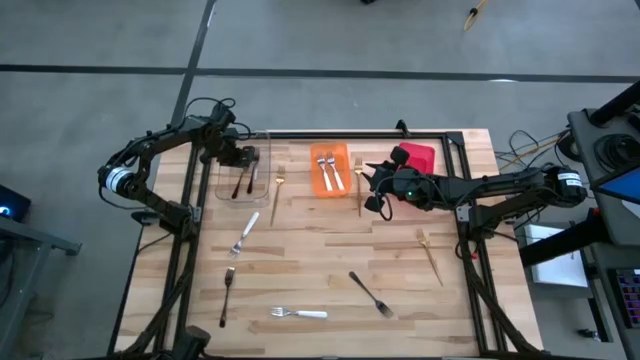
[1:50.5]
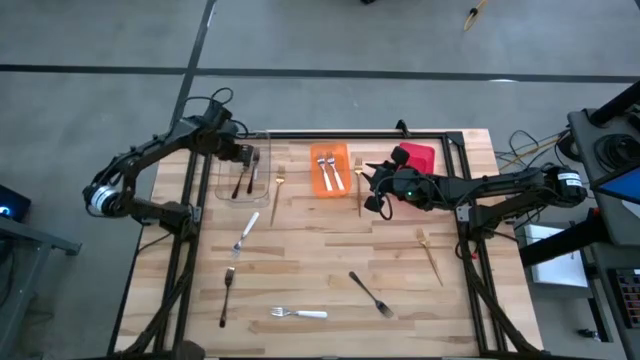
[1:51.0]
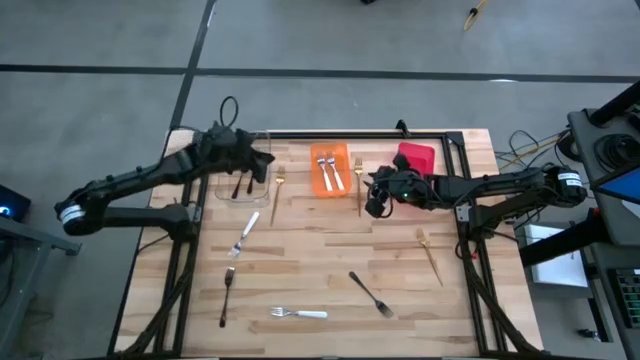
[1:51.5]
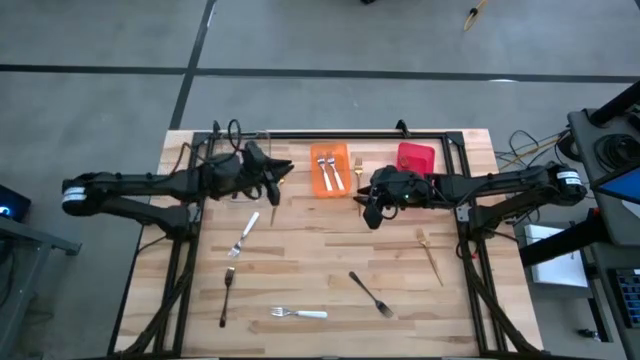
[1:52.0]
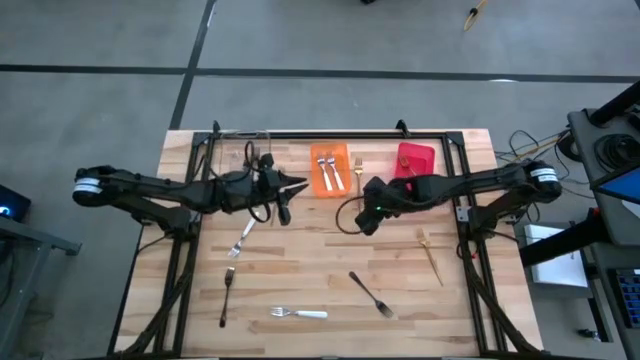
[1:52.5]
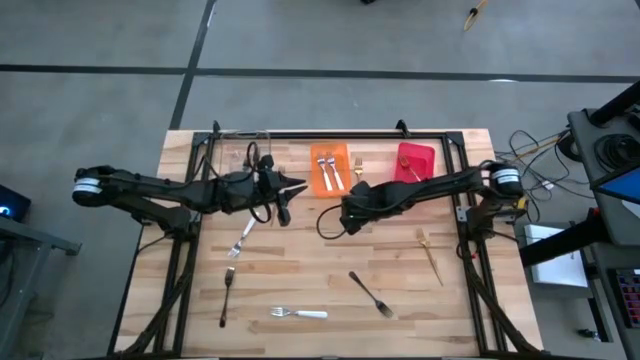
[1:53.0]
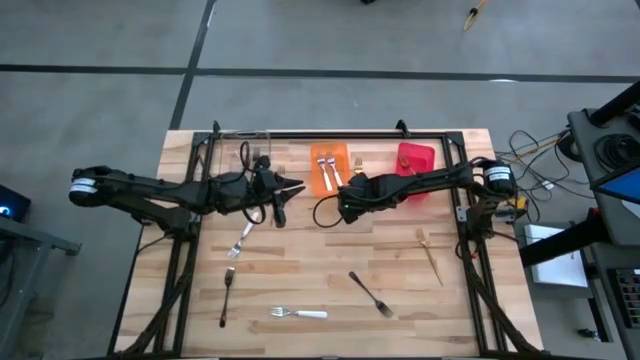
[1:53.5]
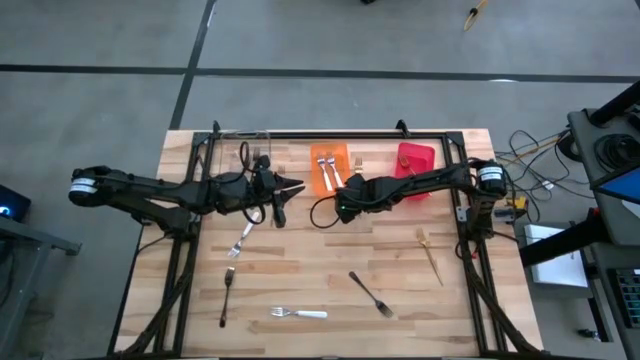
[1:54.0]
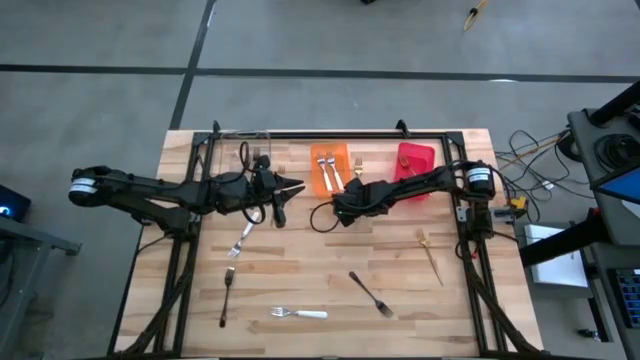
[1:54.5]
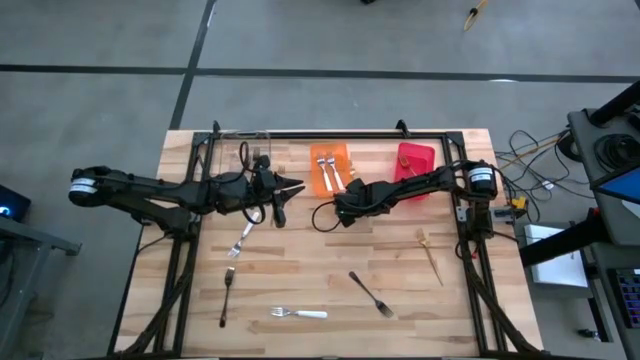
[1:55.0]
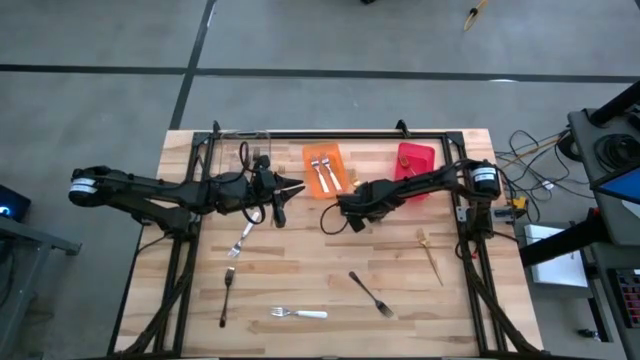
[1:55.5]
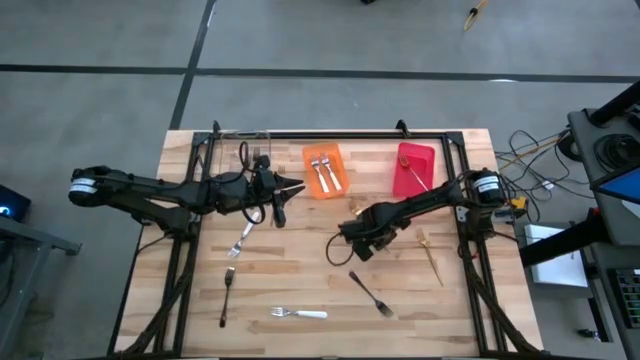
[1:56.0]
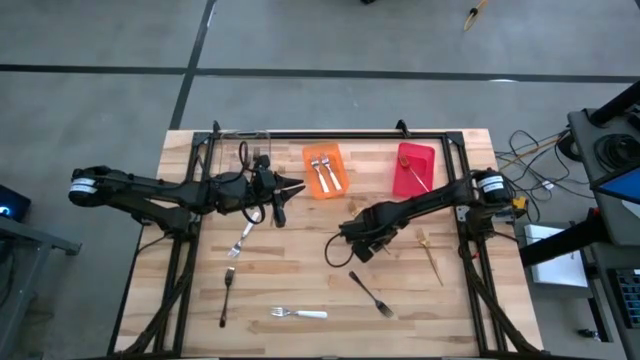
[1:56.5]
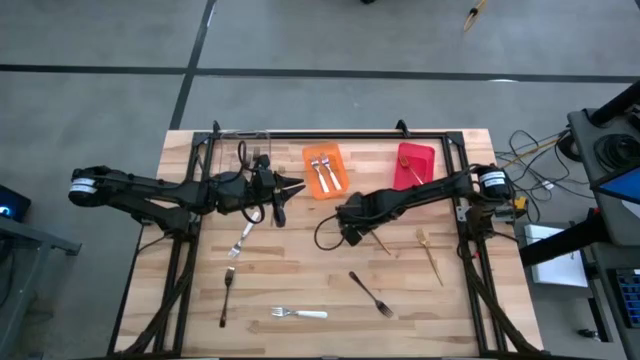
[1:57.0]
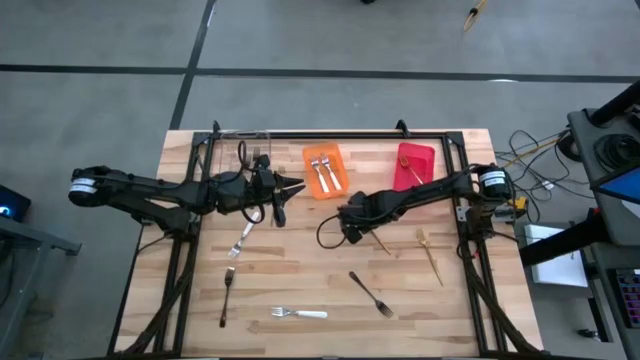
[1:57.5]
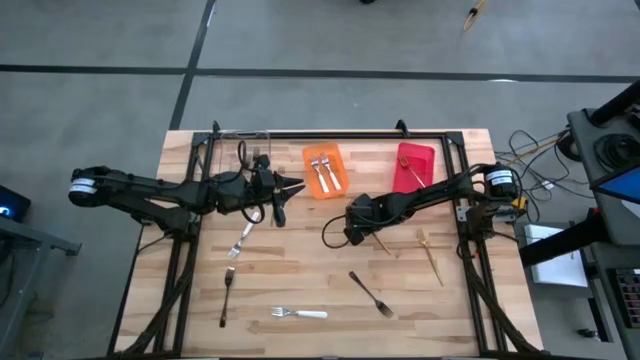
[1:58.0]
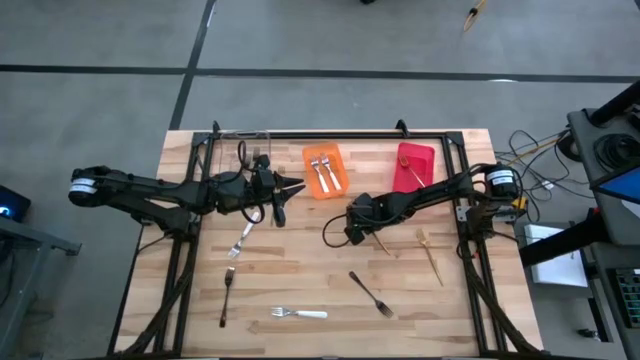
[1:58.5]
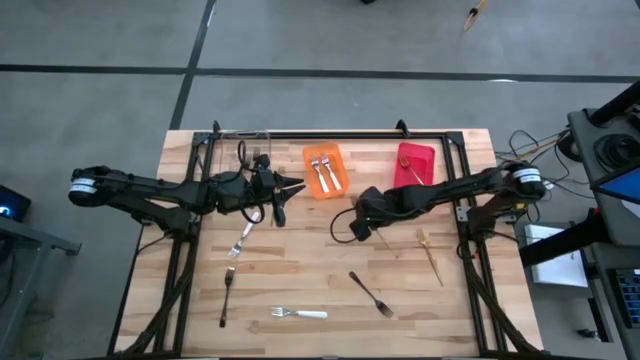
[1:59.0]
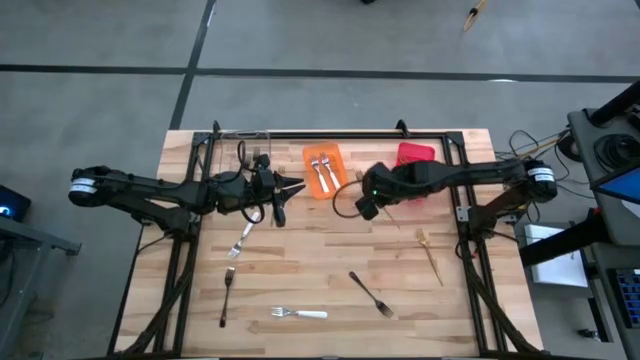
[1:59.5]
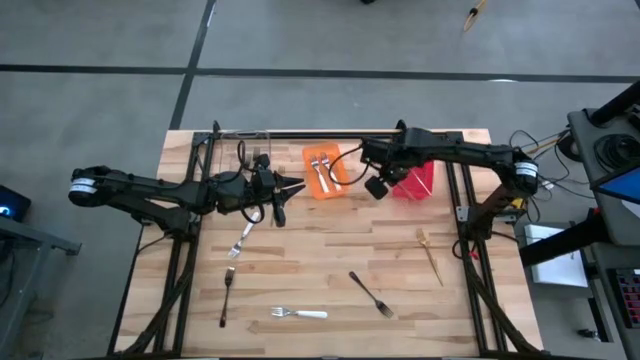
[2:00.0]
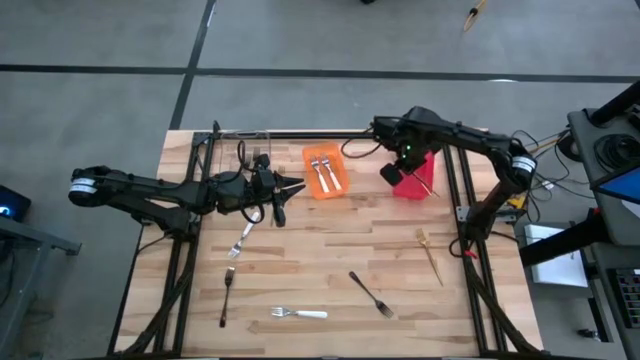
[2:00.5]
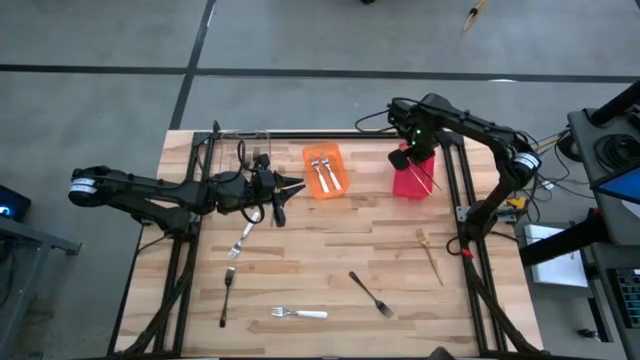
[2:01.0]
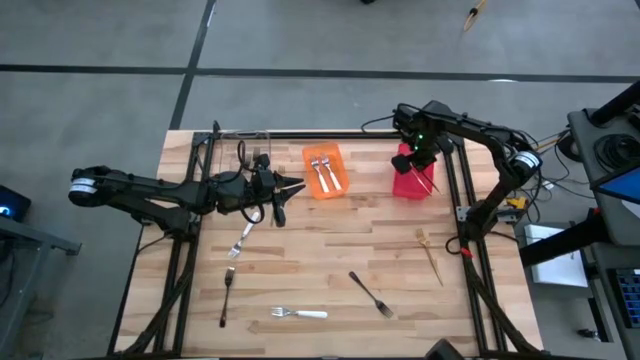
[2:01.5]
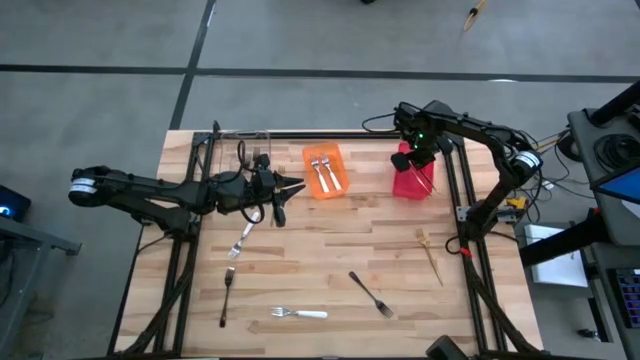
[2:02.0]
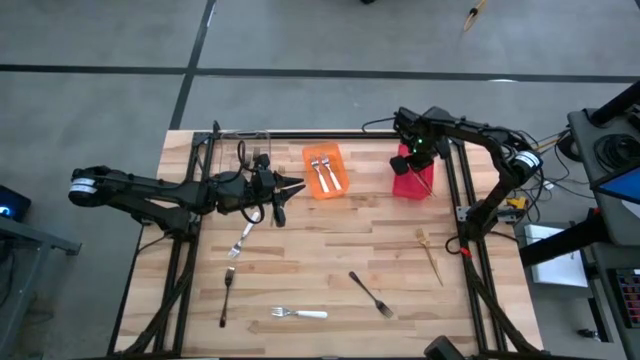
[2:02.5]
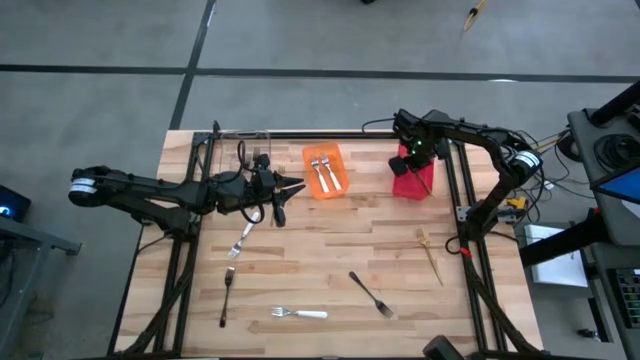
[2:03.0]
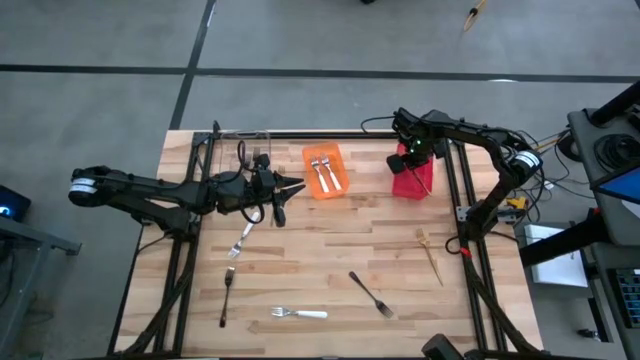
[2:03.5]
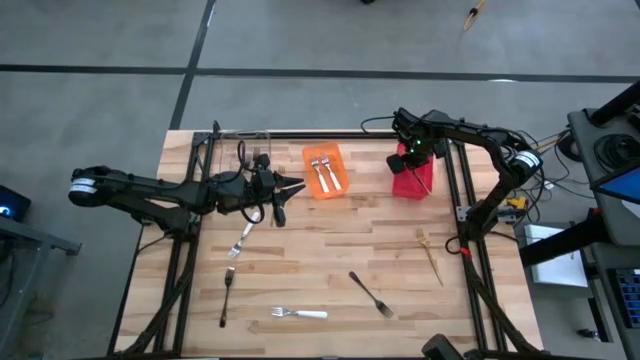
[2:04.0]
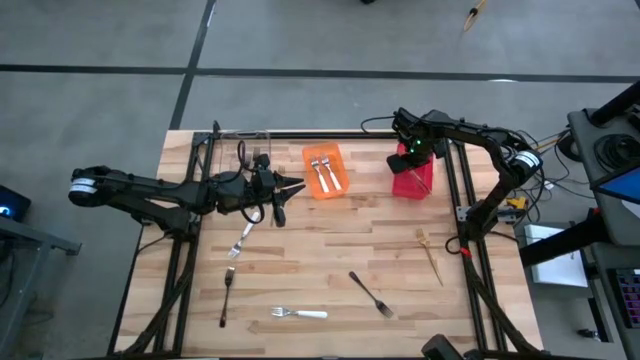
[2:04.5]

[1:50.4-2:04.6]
Task: Sort silverware by color (type)
Put the top center gold fork into the red bin

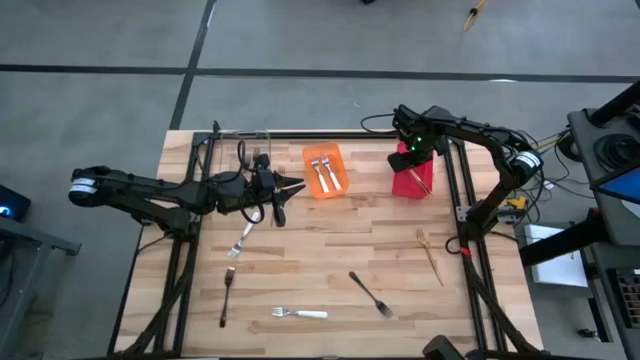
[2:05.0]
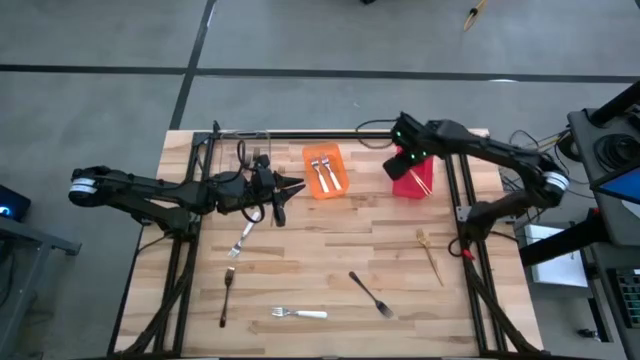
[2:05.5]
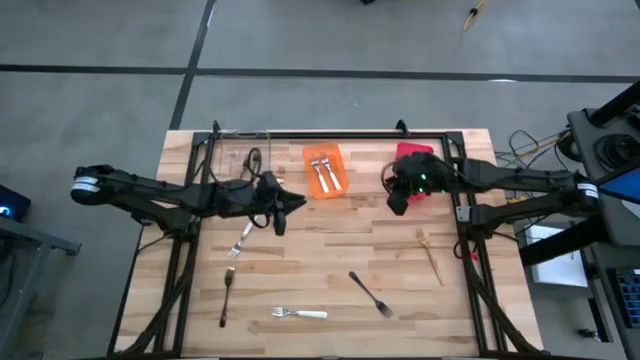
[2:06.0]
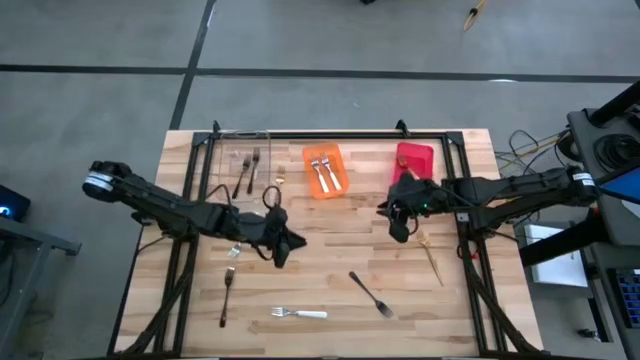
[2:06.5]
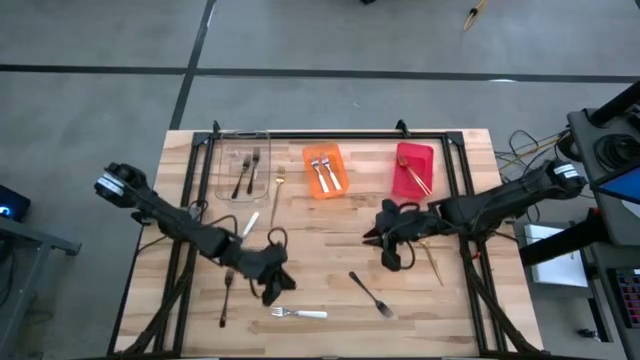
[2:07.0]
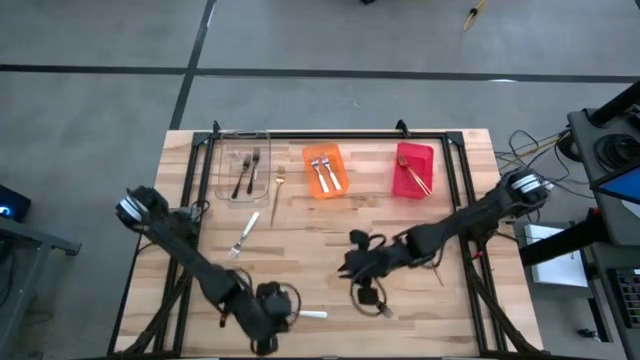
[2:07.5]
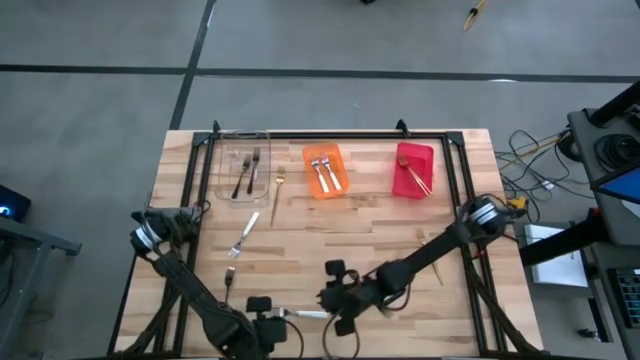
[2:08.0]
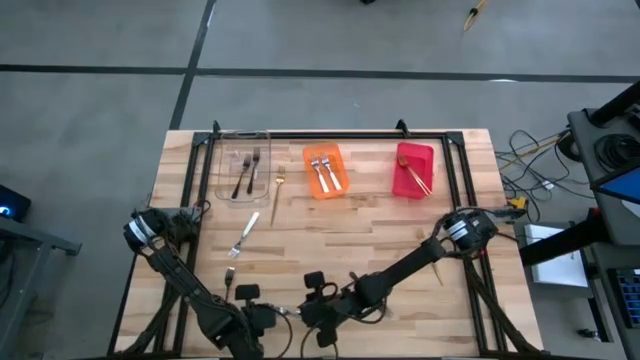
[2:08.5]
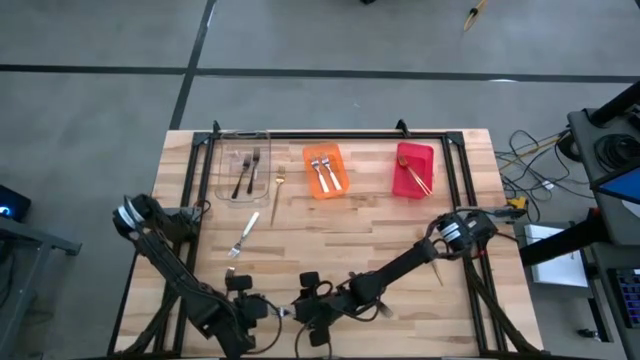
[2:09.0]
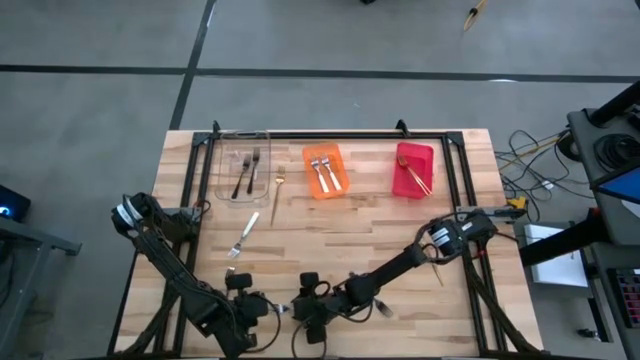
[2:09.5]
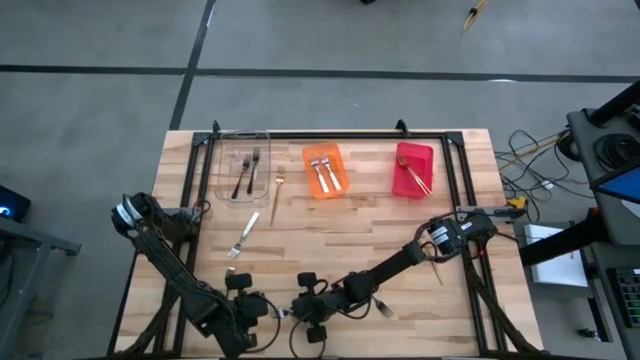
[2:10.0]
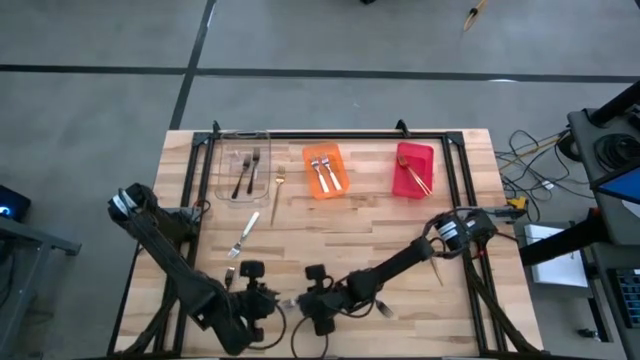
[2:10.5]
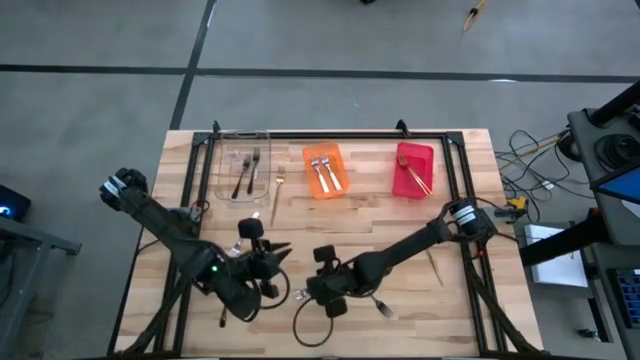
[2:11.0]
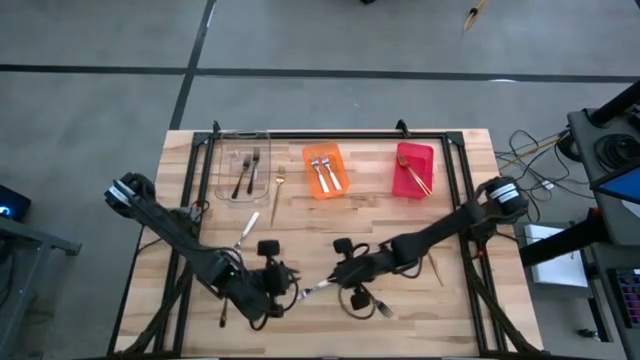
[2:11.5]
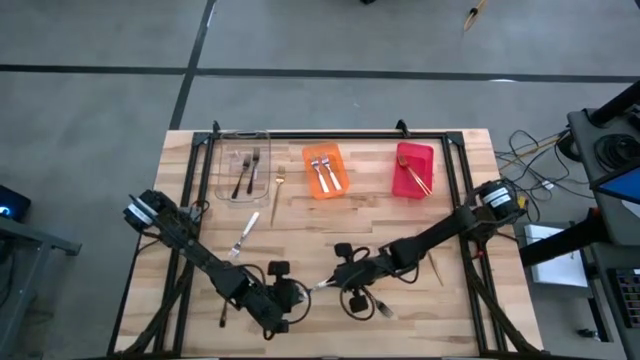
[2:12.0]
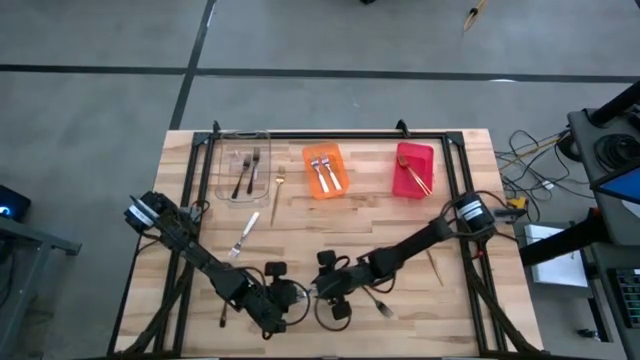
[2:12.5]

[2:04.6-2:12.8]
Put the bottom white fork into the orange bin
